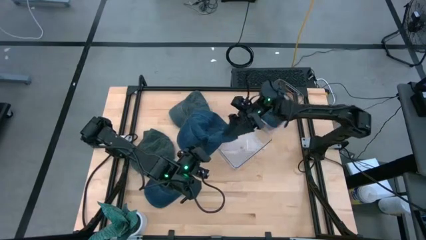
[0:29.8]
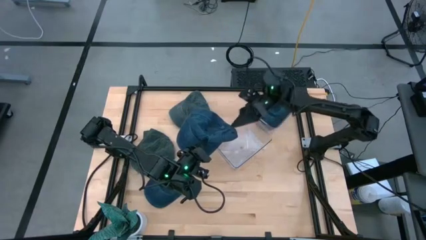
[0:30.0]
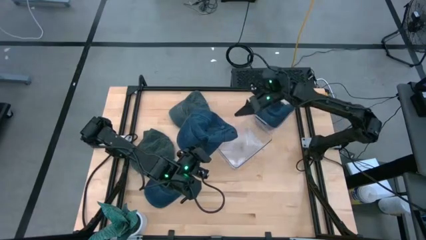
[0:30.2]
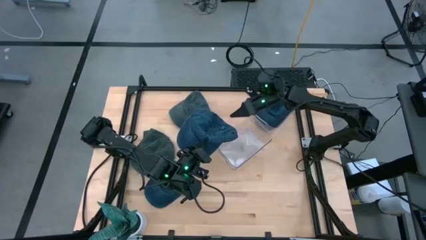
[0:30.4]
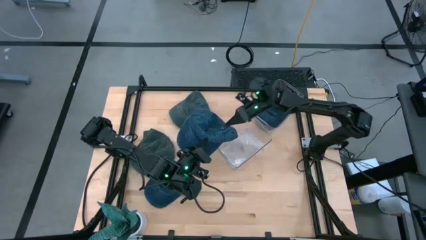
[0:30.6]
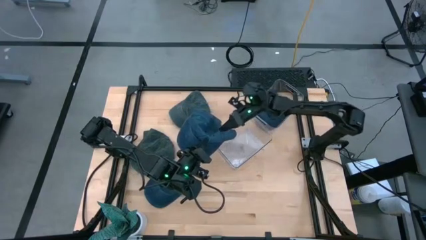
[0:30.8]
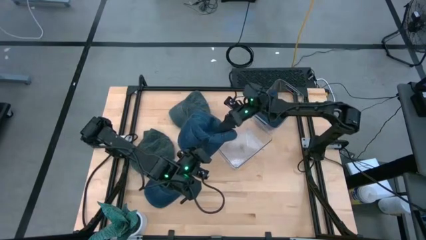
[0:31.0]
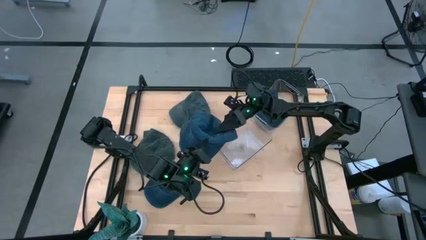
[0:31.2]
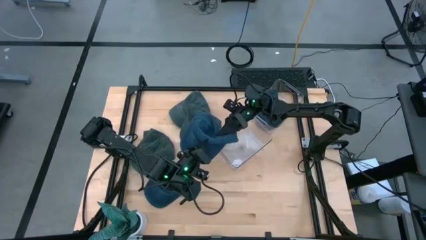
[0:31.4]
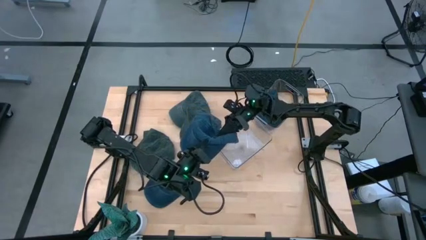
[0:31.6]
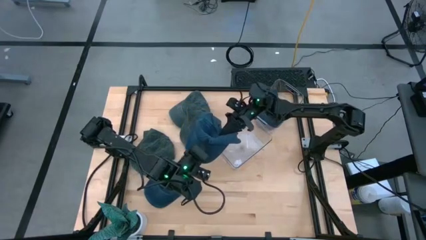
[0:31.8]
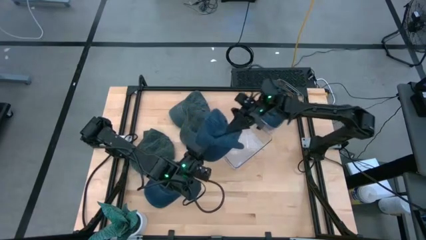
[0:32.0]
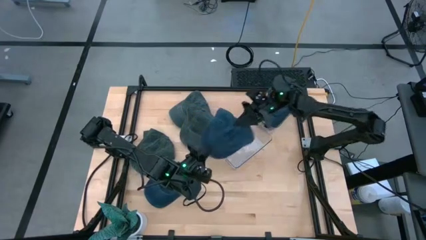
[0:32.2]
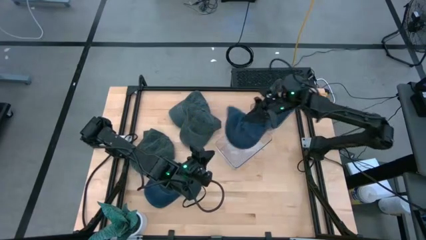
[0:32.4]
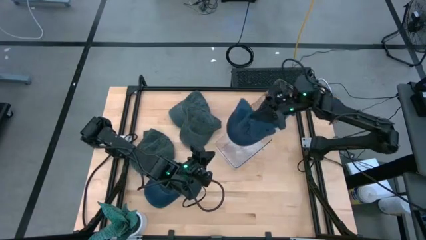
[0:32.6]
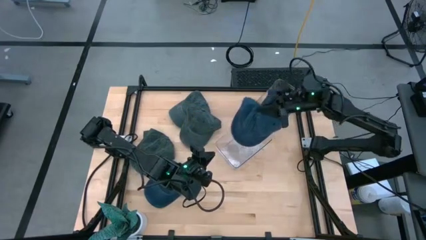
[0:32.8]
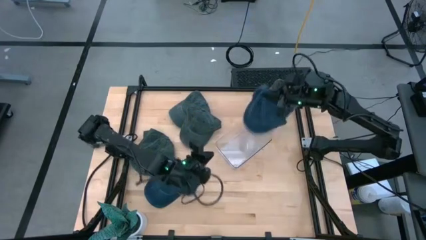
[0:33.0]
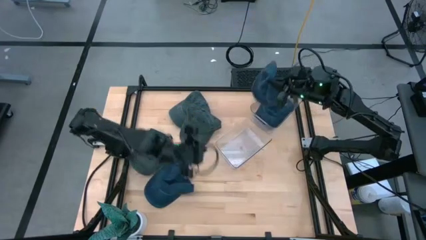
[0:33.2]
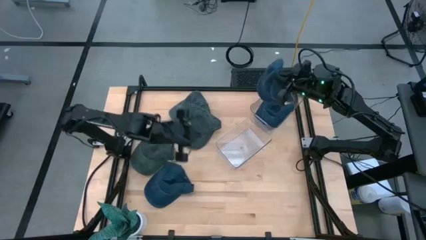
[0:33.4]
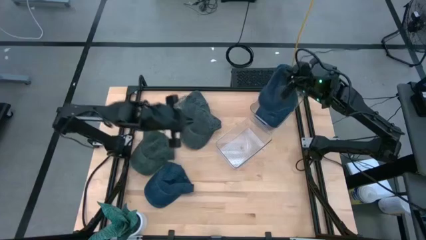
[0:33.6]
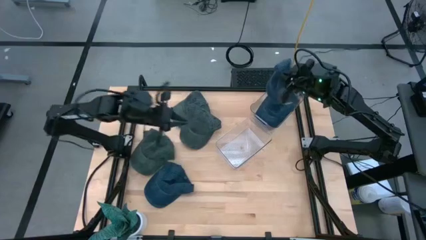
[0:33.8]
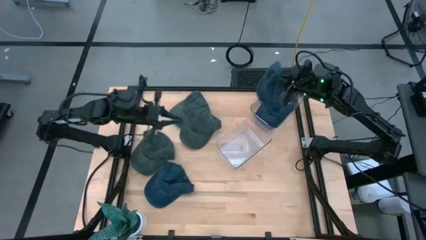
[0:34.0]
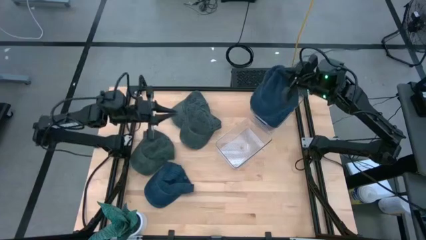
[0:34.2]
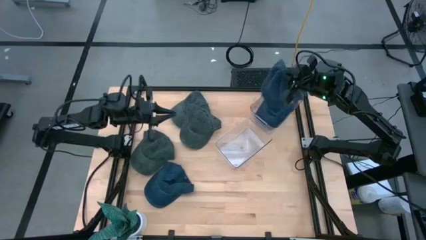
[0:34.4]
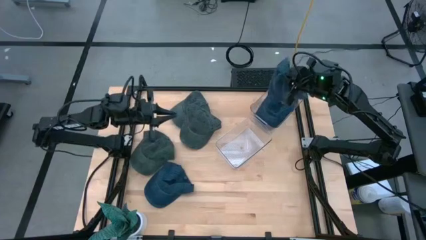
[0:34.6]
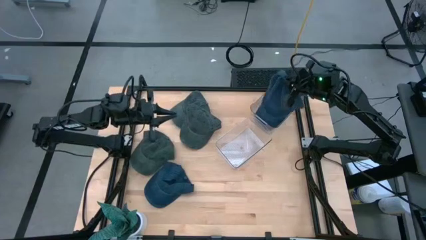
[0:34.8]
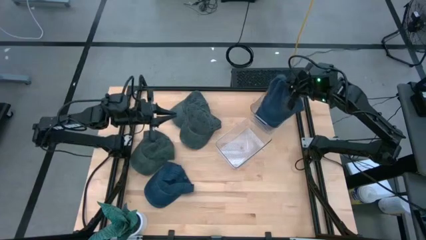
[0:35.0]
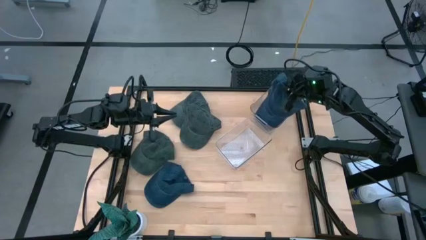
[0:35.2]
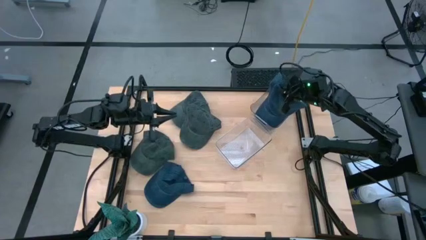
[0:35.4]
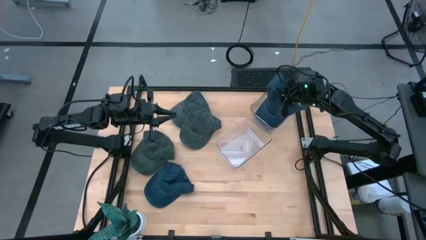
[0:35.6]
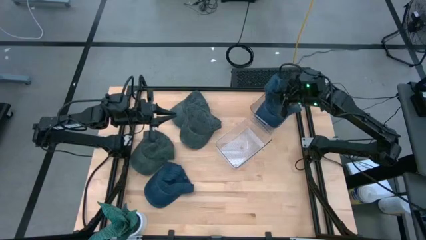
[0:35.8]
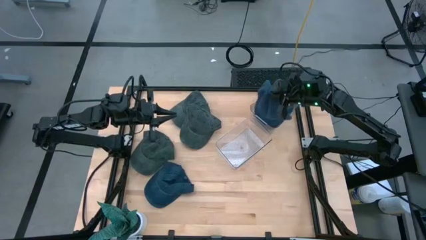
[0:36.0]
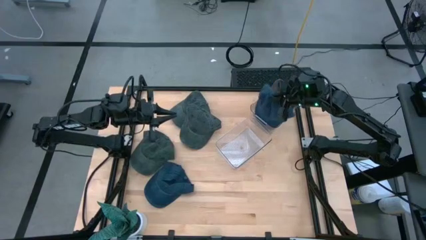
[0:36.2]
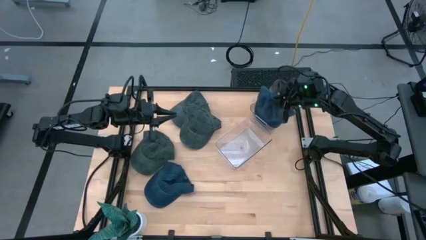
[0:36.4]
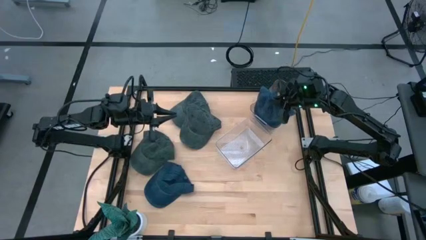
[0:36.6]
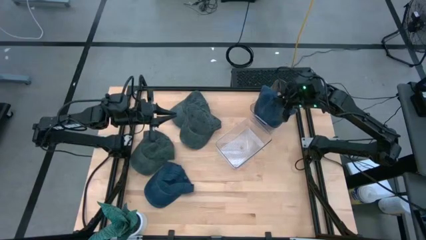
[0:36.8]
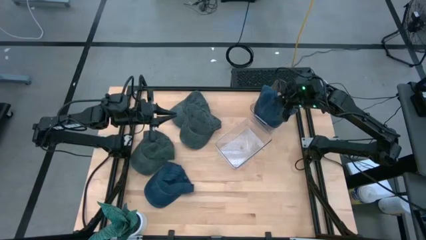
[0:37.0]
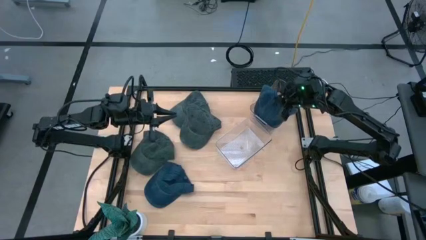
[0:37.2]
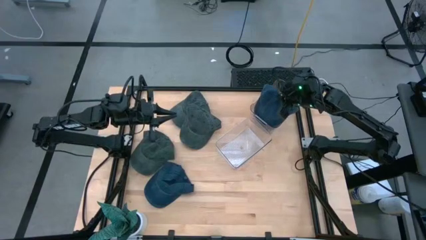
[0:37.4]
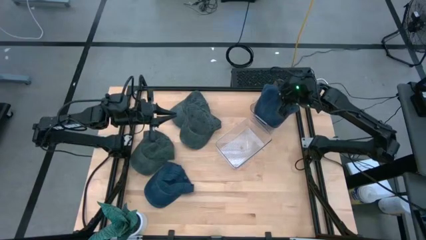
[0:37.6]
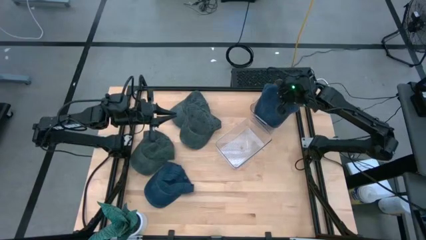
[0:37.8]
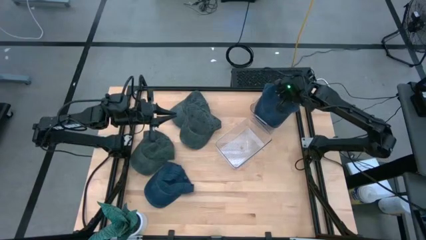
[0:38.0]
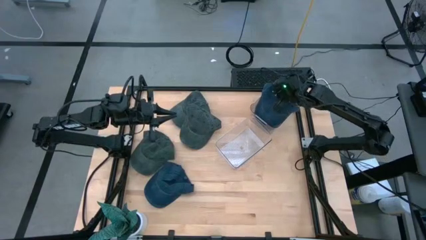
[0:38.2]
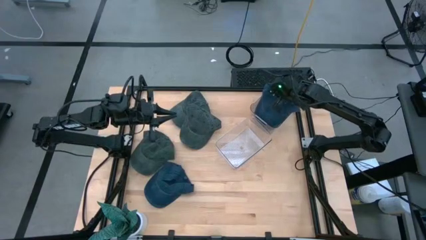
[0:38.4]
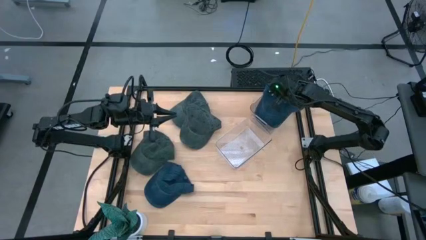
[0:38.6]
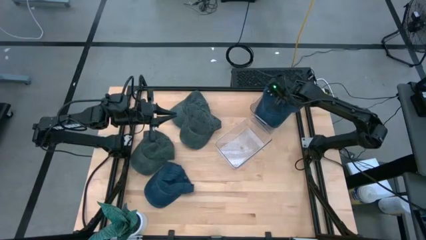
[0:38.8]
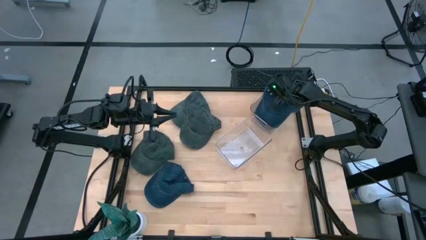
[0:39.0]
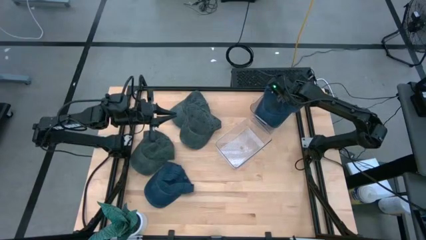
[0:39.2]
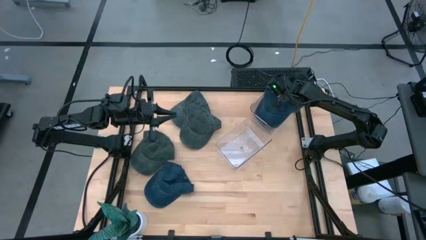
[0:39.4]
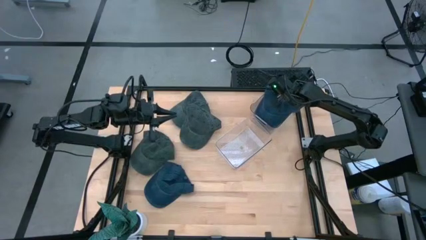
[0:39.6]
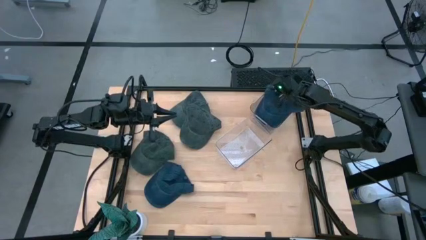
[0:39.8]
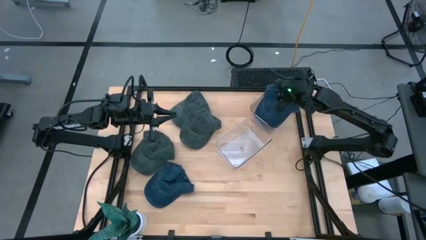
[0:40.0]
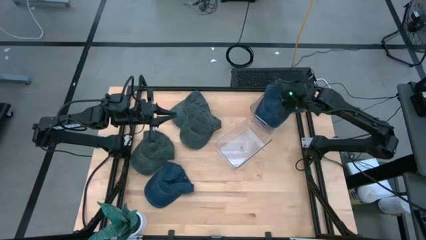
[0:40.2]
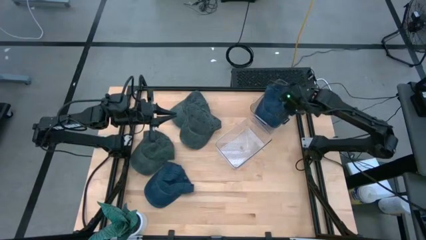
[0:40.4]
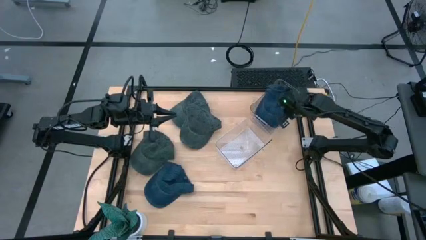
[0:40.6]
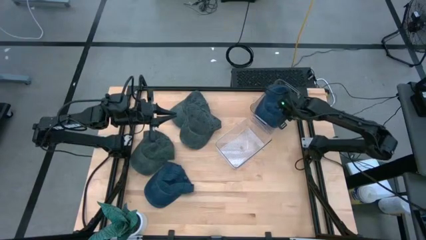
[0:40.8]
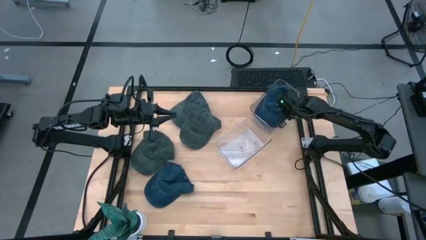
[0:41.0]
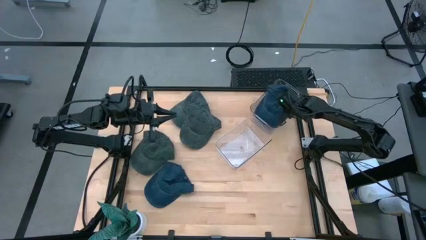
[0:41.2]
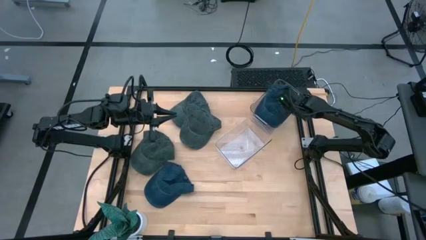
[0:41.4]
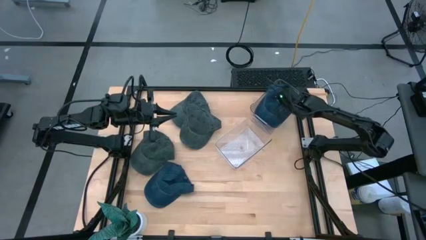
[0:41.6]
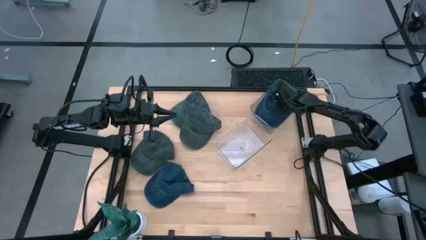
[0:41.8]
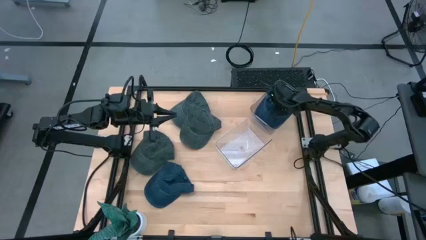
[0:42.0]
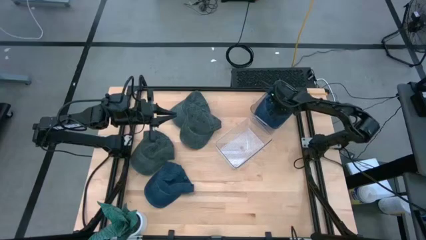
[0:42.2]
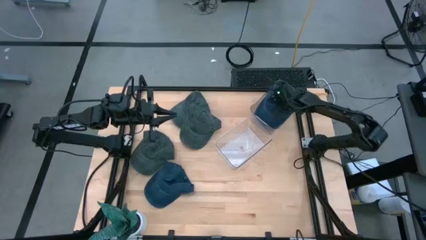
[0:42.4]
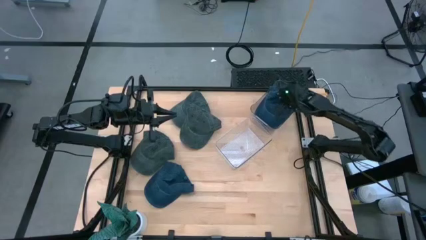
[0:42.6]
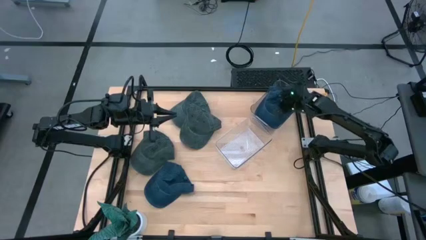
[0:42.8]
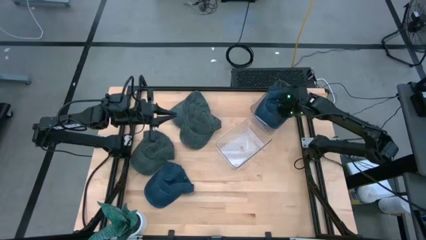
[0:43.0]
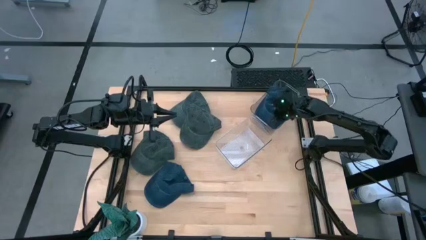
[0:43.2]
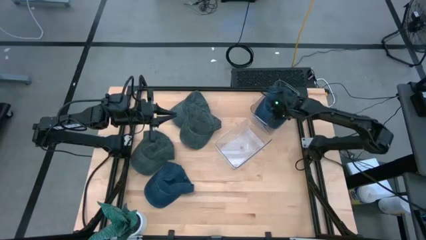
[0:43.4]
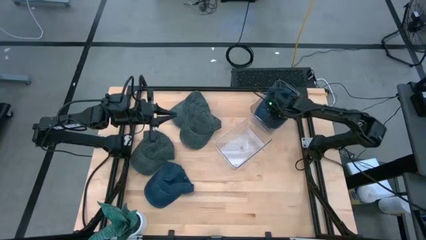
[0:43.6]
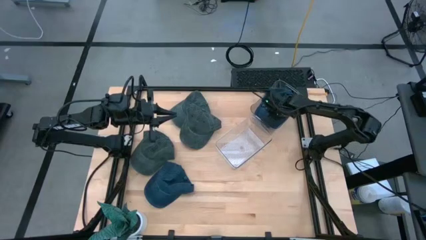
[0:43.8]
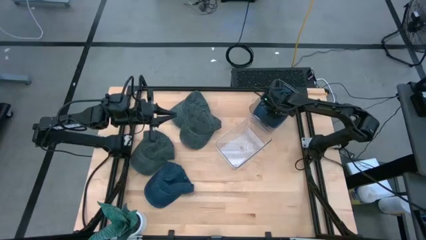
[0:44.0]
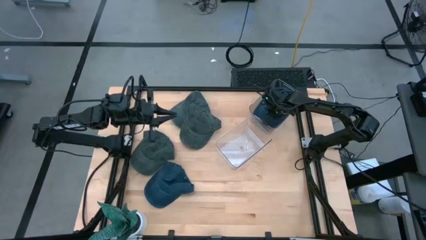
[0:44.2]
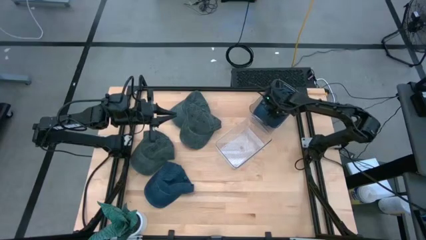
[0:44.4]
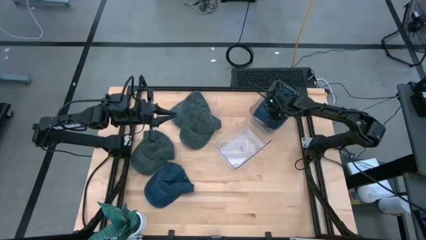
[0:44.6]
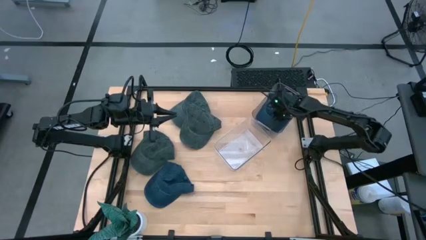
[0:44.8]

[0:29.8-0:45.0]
Task: Pick & Place hat
Put the right blue cap into the top transparent bin
